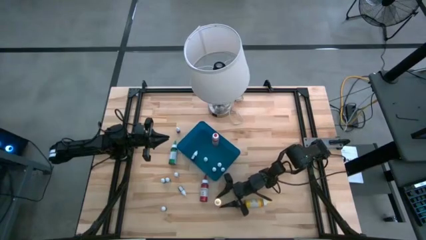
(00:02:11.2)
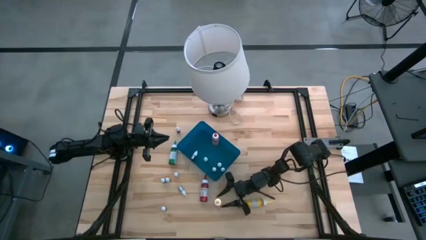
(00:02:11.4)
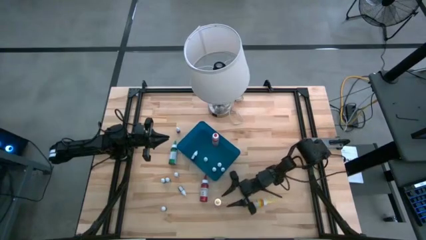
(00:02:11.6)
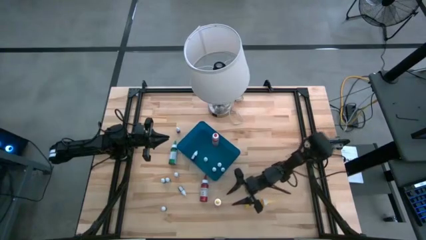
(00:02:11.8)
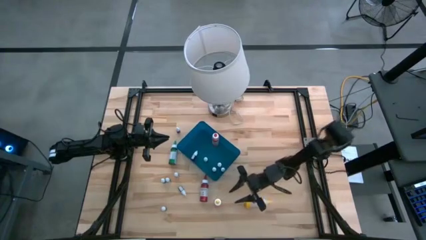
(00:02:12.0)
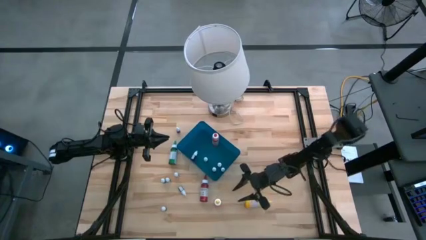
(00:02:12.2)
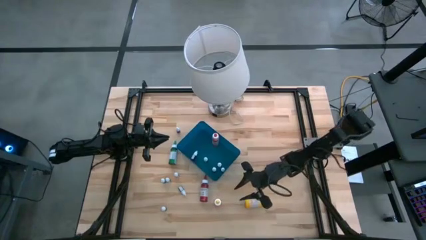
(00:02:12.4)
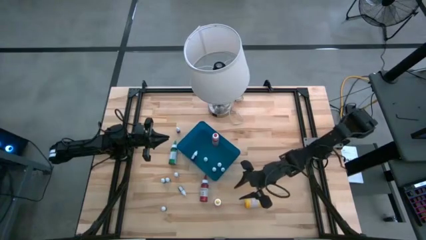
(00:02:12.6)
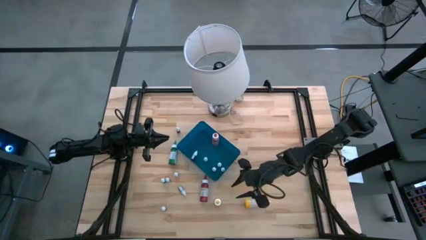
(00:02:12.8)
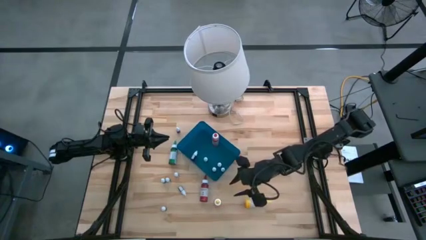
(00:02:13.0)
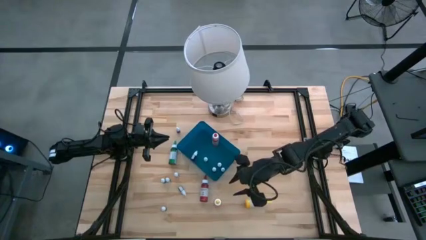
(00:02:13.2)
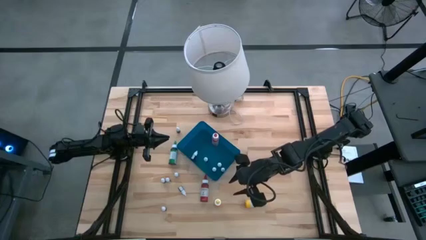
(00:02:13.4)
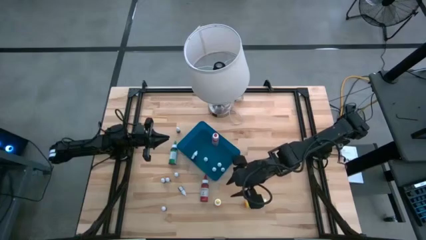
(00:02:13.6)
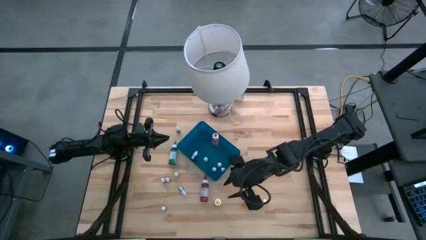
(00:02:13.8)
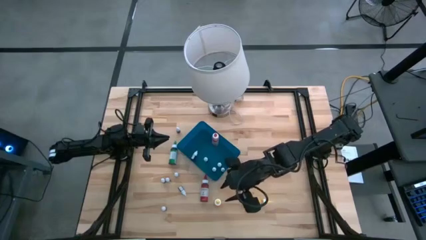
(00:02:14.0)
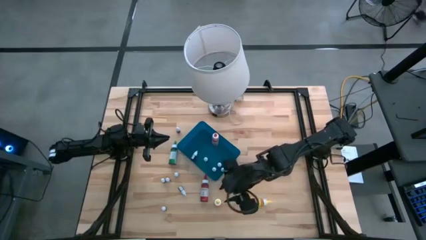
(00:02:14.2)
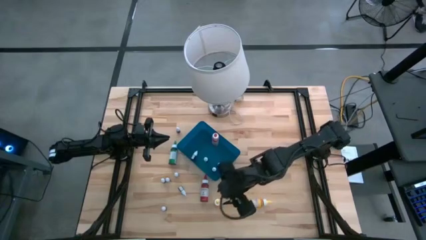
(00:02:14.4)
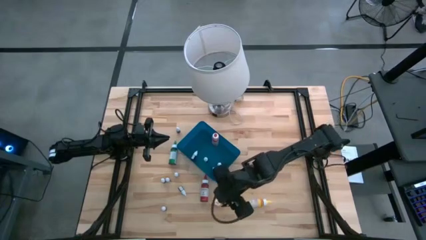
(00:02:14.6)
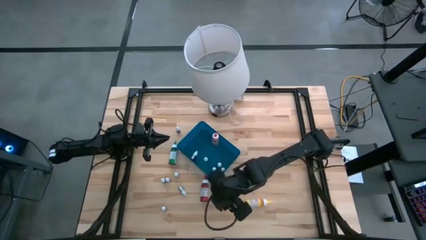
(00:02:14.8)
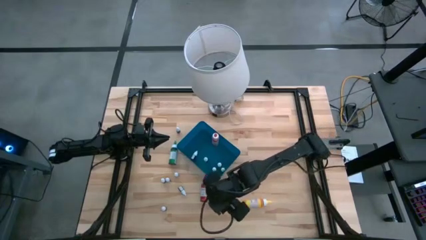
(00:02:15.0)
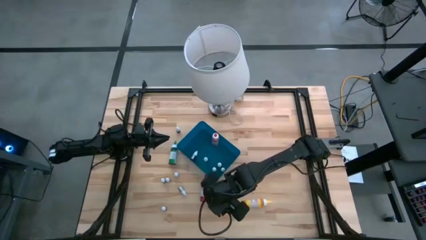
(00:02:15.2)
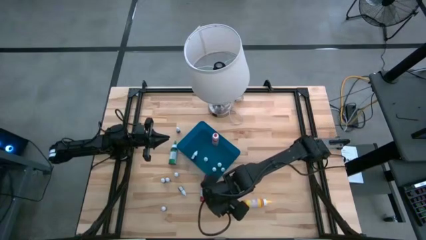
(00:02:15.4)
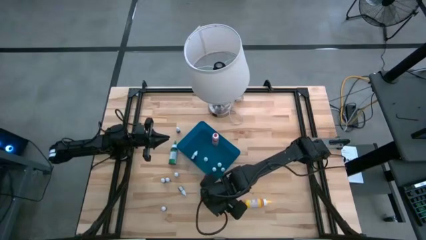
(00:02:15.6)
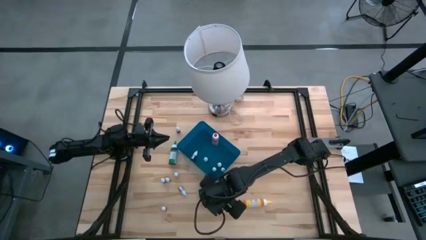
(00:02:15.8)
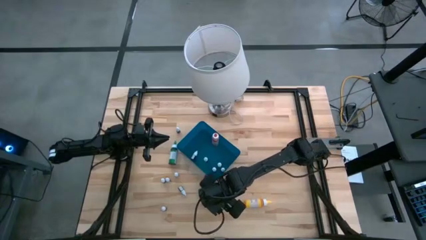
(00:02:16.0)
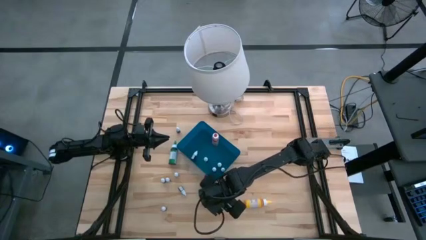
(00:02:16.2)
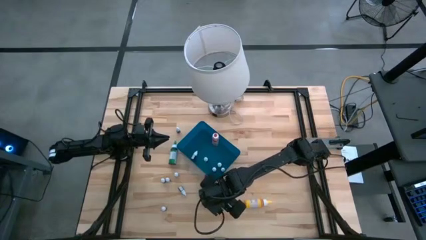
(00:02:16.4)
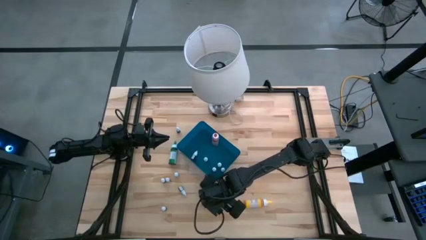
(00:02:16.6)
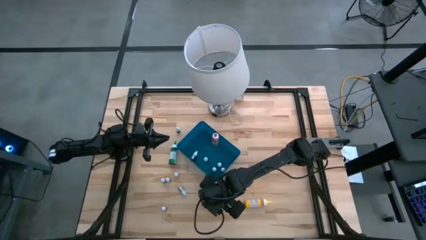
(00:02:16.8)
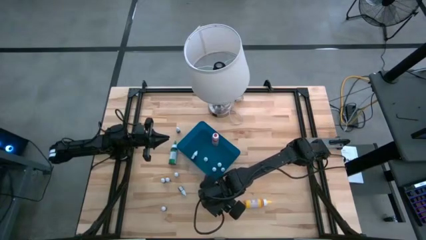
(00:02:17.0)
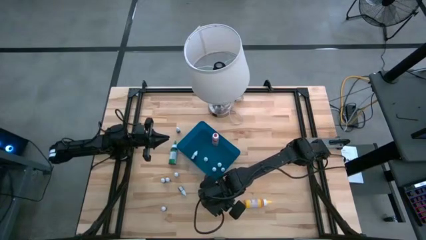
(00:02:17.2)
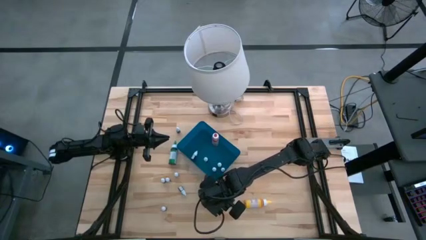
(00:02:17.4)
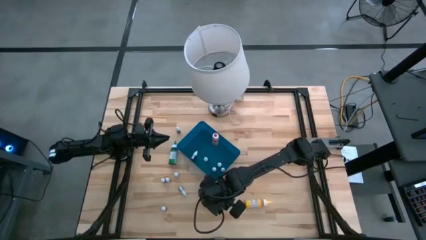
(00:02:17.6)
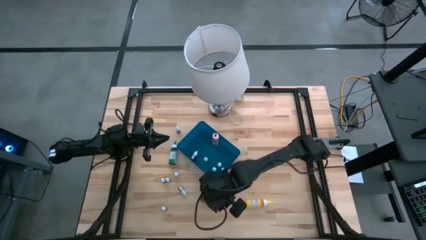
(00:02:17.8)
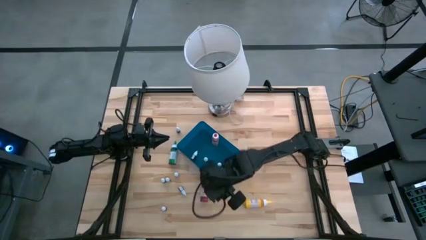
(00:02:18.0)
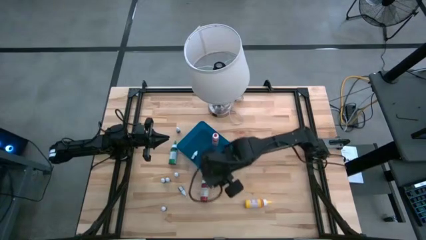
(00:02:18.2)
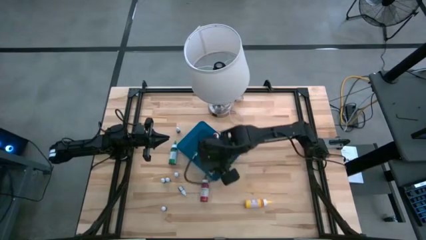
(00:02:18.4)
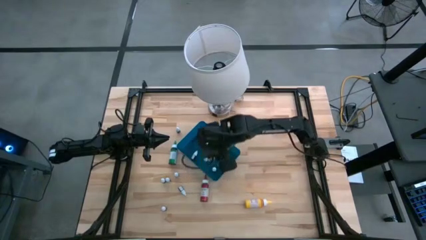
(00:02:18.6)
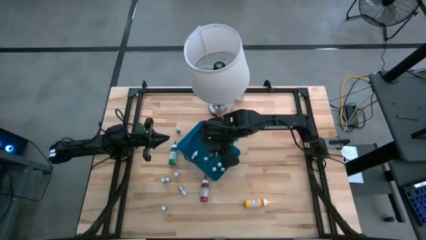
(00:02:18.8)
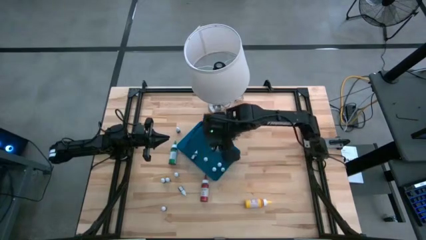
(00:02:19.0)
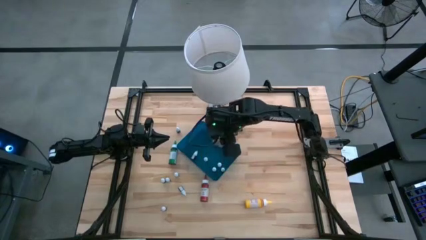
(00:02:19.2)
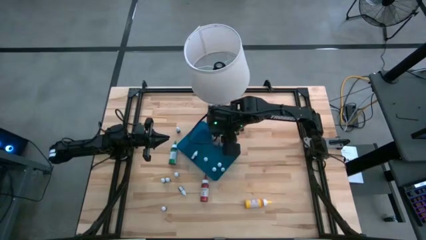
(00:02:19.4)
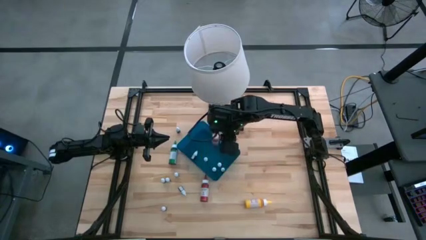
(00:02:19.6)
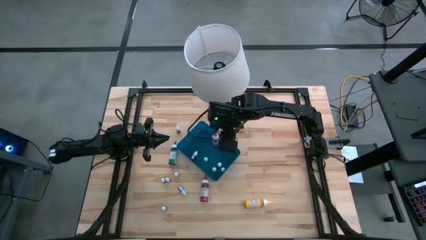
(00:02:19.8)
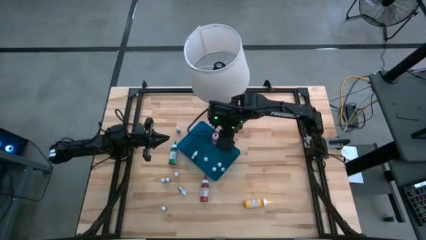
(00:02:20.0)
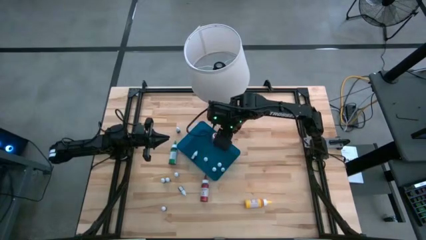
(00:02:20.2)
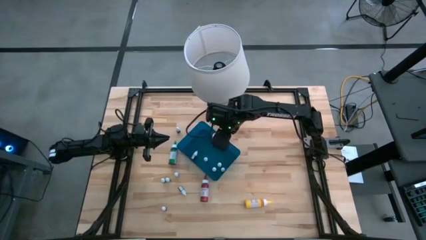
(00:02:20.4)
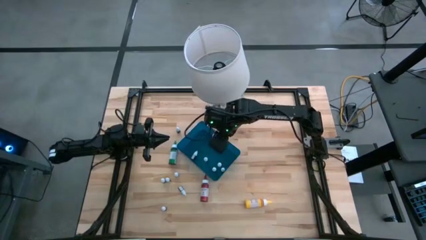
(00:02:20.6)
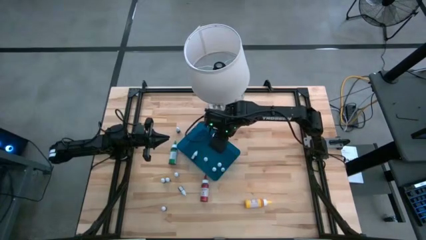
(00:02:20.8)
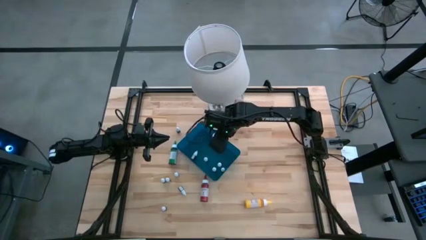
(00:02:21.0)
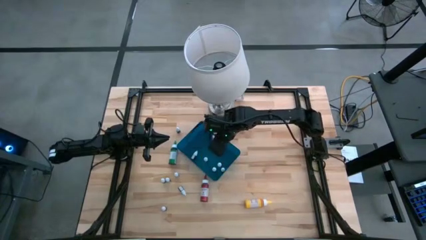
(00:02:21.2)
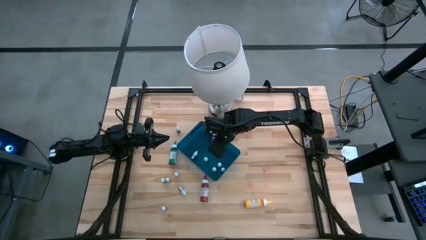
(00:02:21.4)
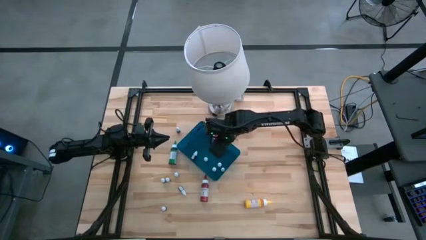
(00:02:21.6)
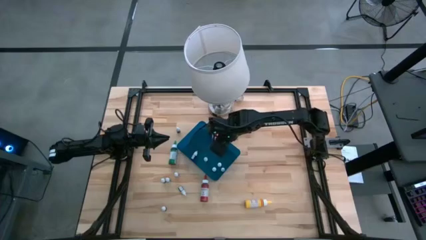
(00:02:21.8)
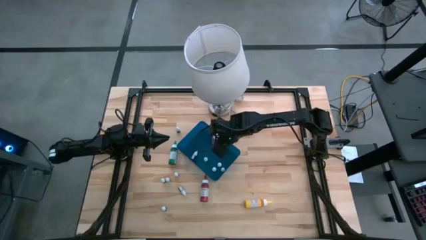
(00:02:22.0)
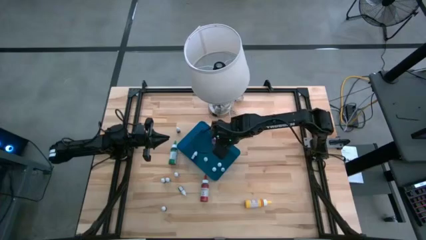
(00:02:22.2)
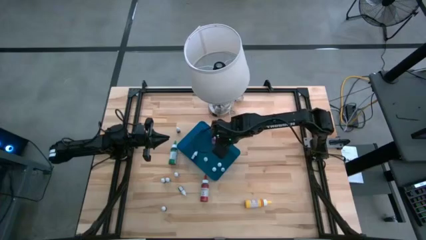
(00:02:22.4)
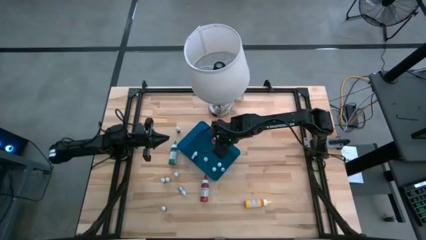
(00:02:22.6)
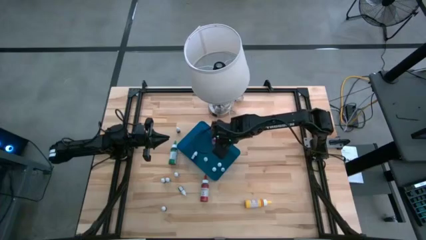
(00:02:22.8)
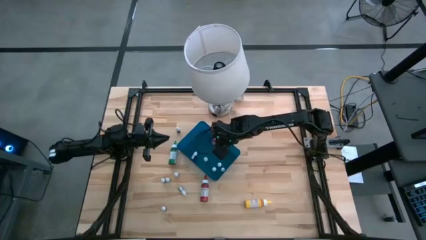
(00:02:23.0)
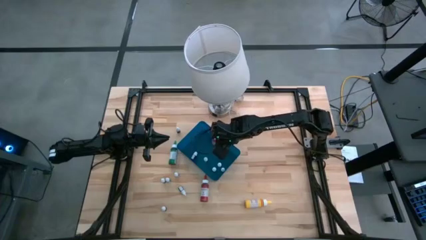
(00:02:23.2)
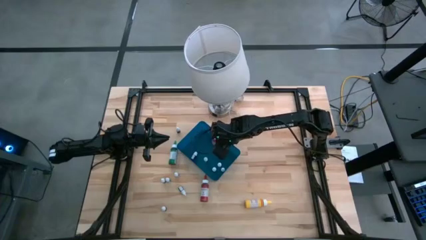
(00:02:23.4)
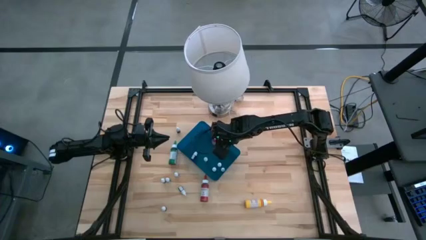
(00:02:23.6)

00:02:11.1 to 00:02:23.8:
Task: Pick & Place food coloring
Put the large yellow food coloring bottle into the blue container
